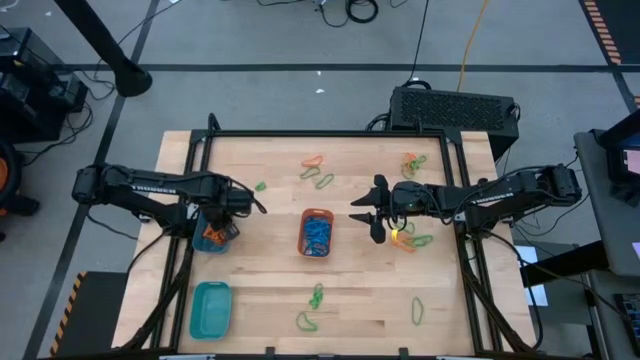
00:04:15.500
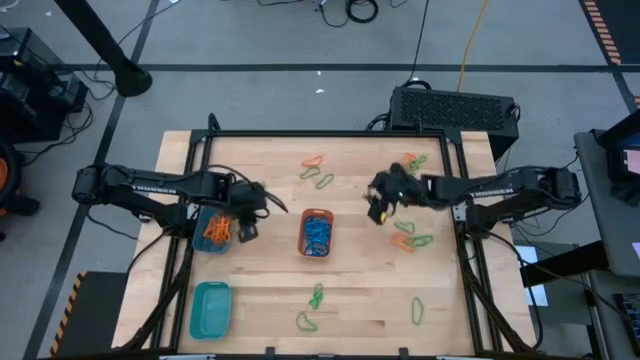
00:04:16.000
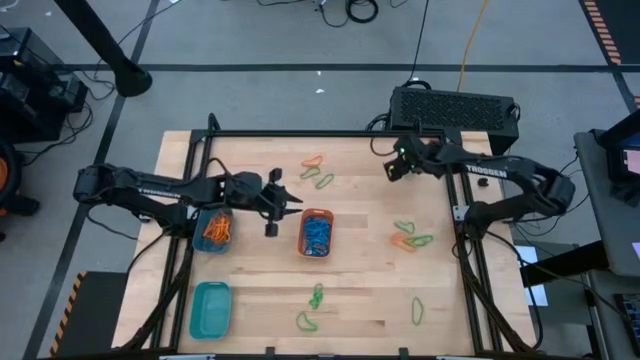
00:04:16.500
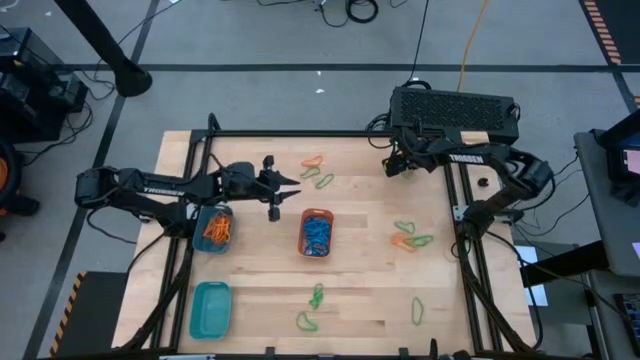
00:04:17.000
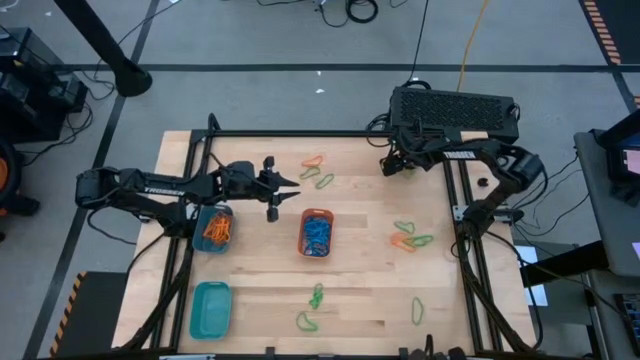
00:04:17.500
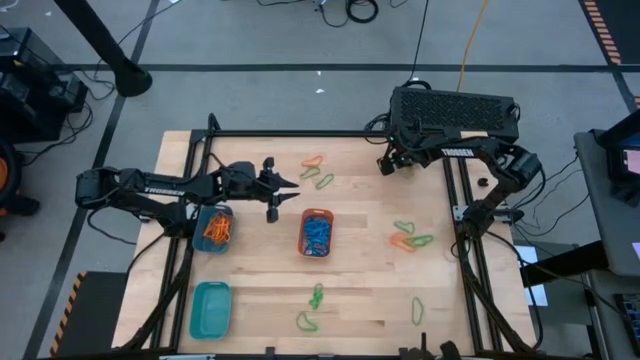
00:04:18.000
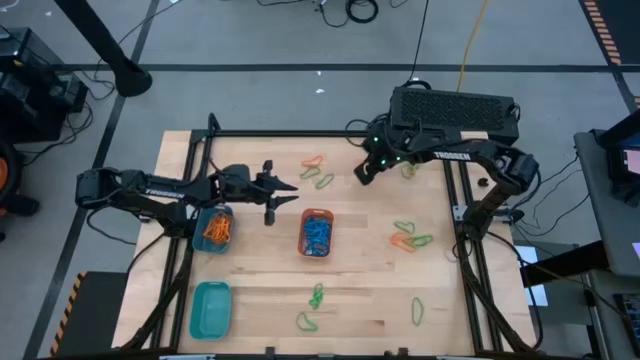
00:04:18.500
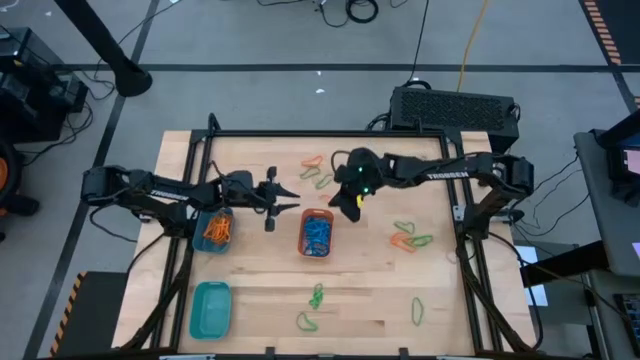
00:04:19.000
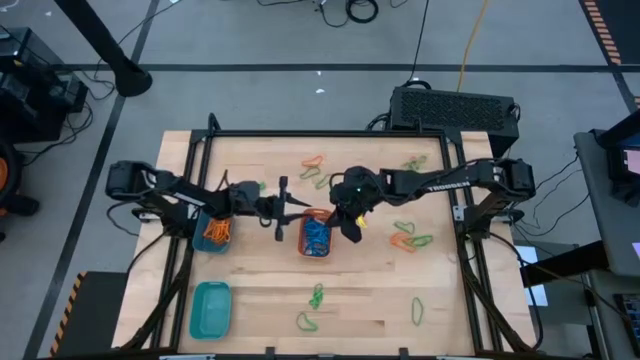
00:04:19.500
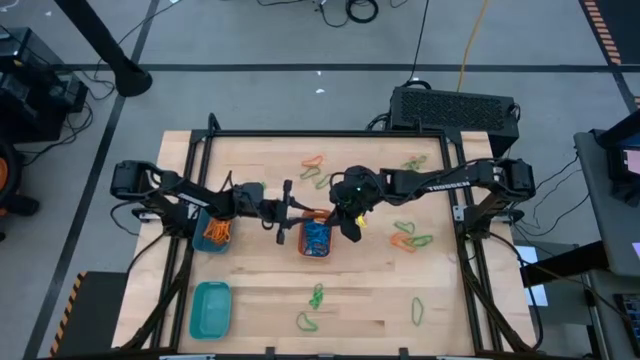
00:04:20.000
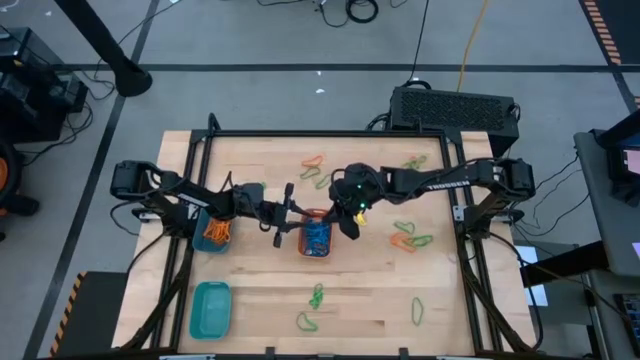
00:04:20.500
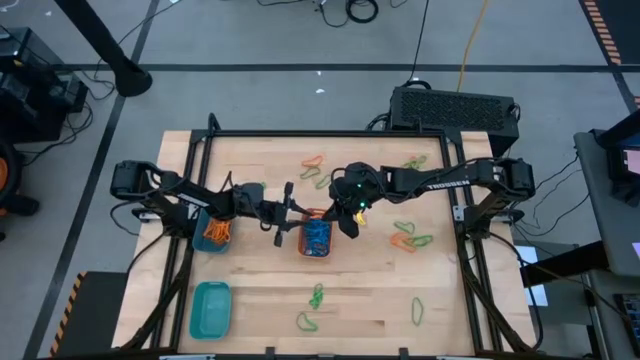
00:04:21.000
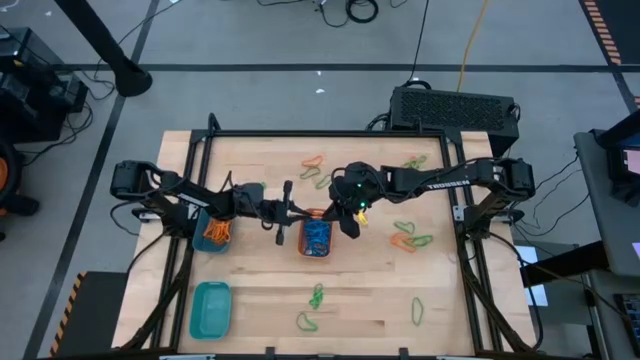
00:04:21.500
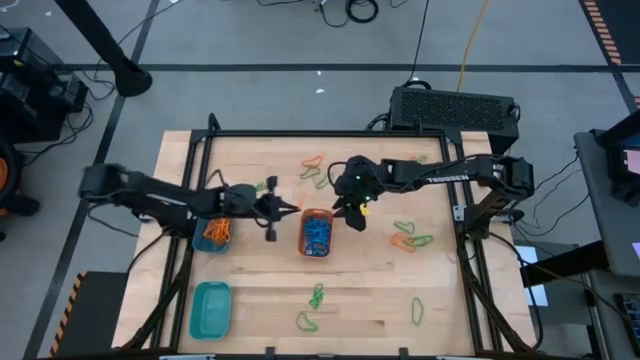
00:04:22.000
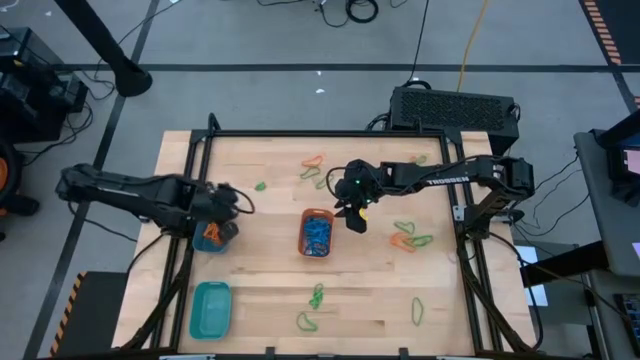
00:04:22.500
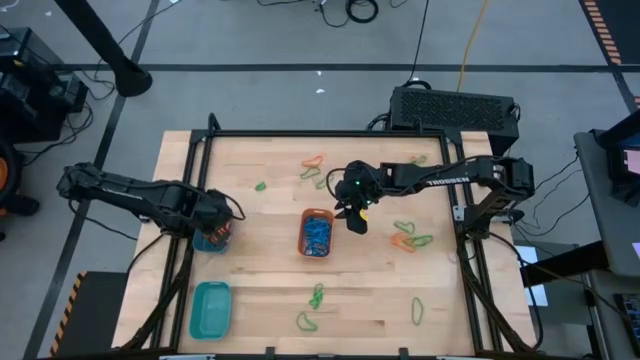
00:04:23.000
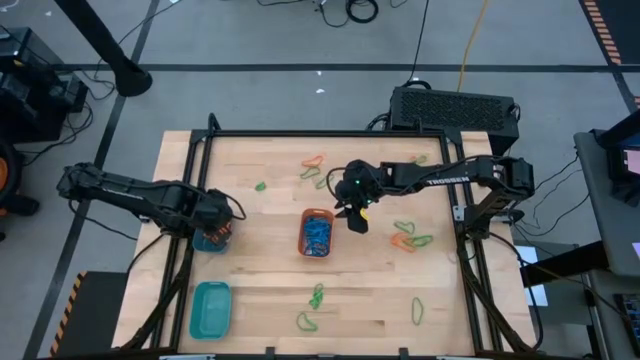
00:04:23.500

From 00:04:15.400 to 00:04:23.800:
Task: Sort rubber bands into baskets
Put the orange rubber band into the blue bin

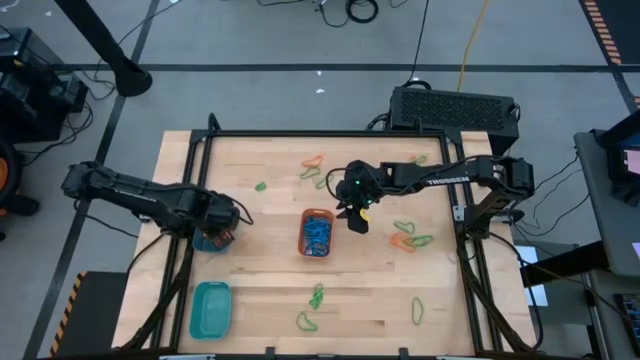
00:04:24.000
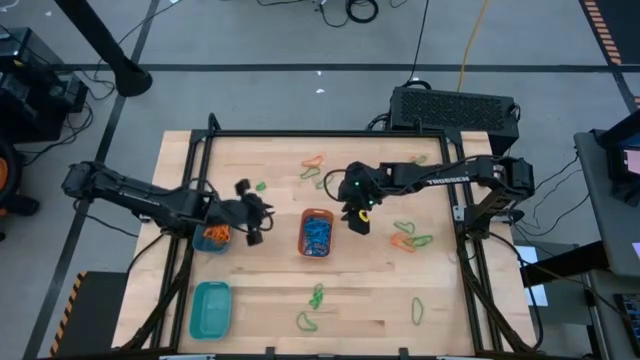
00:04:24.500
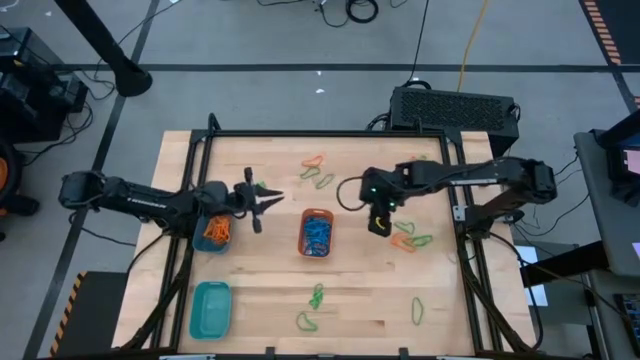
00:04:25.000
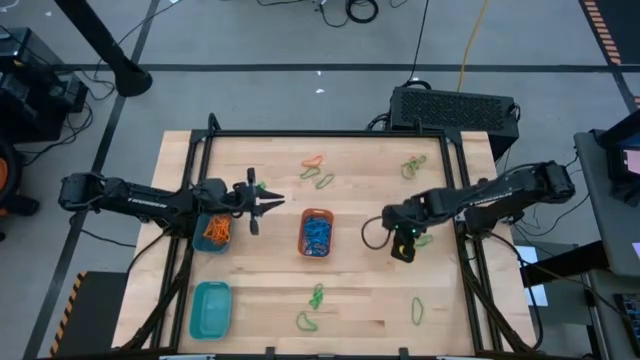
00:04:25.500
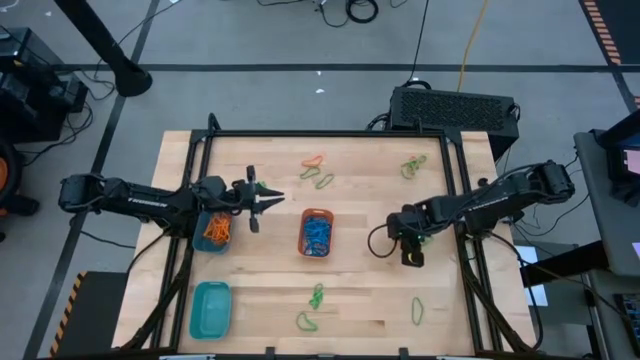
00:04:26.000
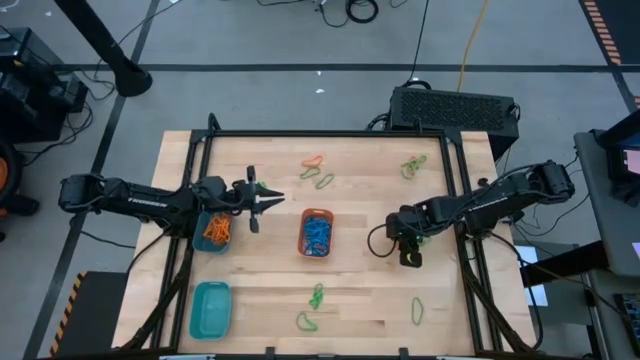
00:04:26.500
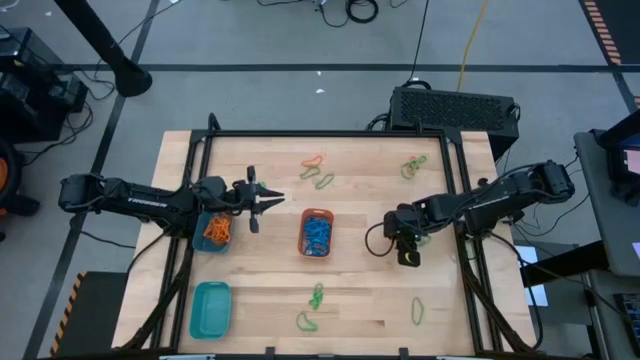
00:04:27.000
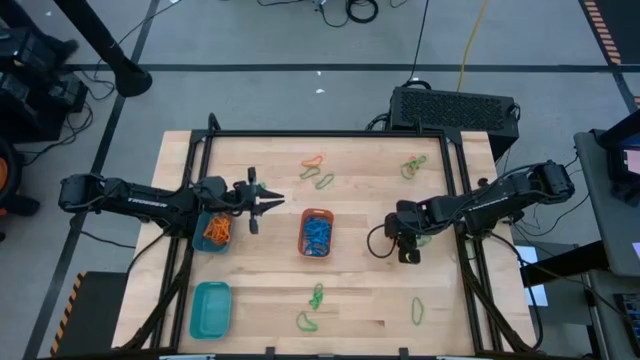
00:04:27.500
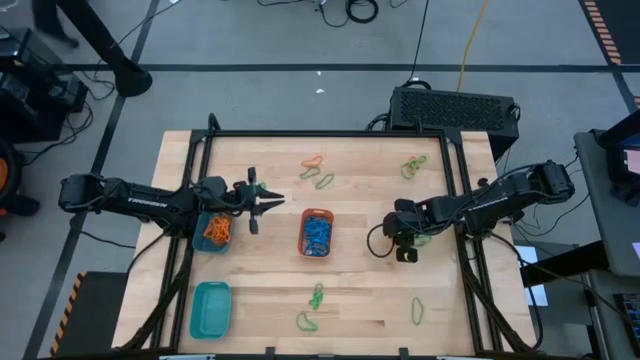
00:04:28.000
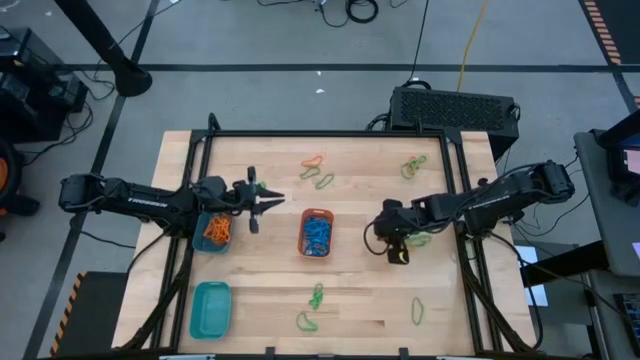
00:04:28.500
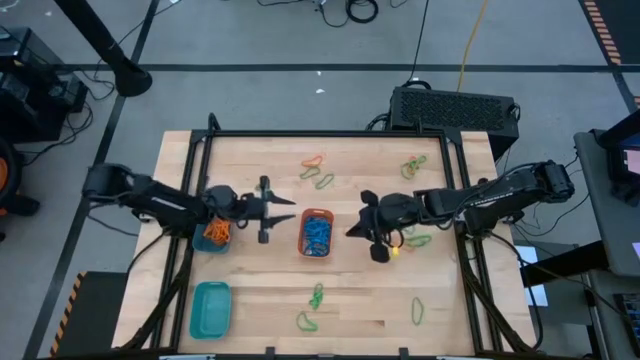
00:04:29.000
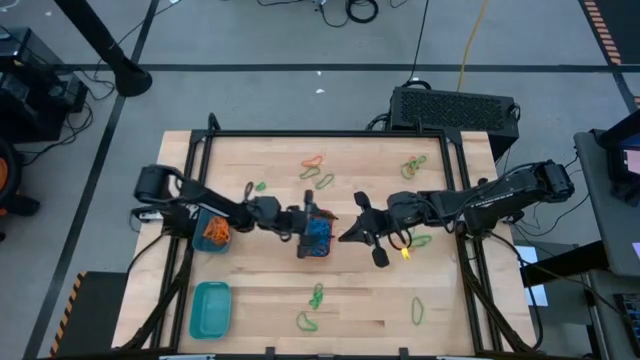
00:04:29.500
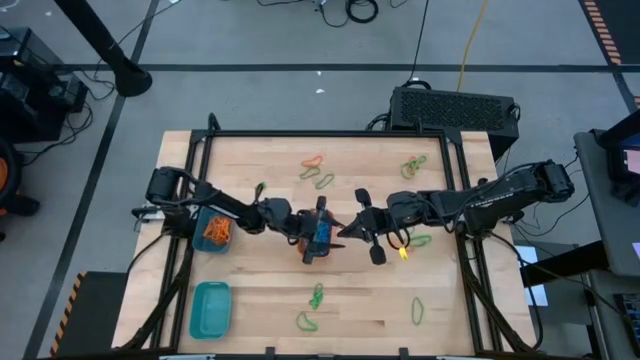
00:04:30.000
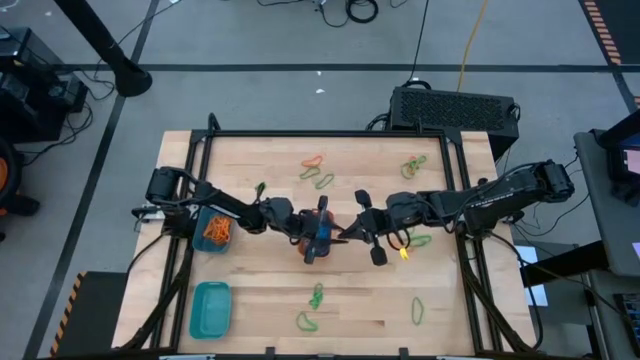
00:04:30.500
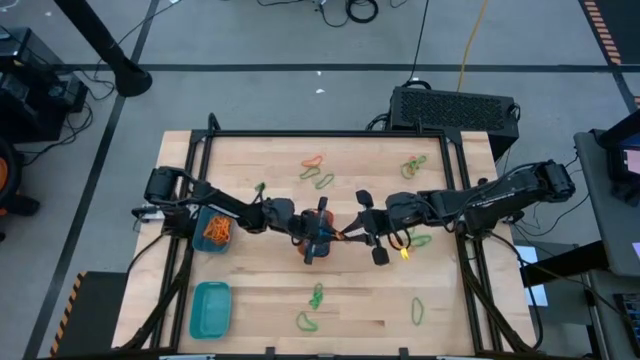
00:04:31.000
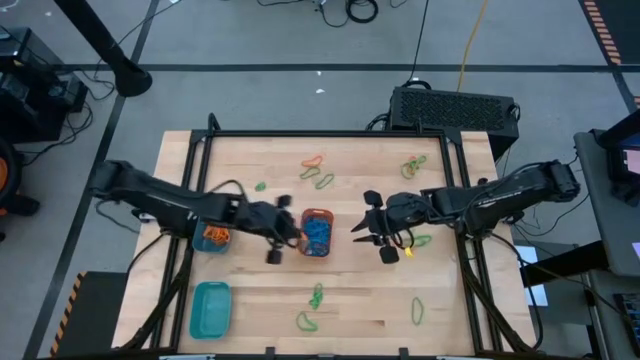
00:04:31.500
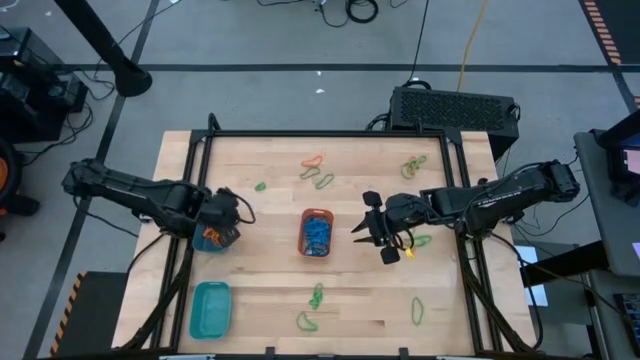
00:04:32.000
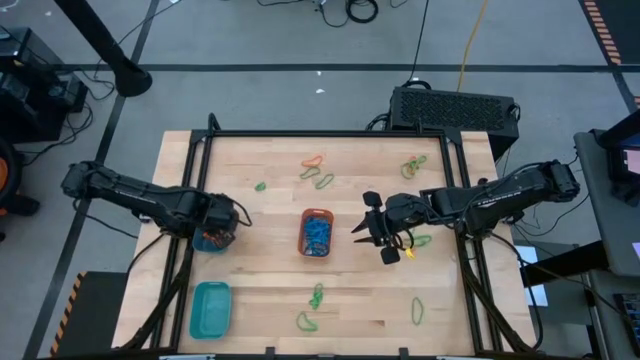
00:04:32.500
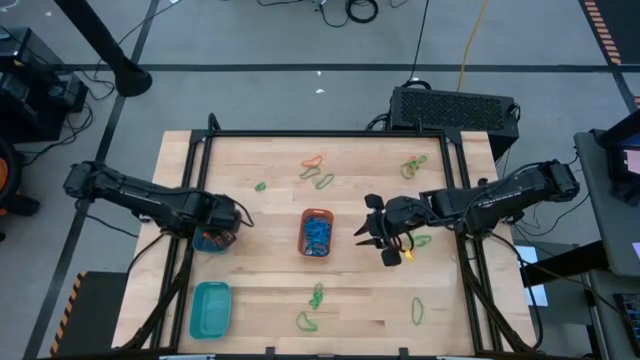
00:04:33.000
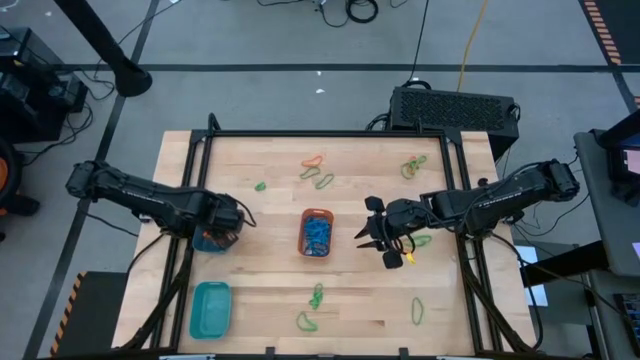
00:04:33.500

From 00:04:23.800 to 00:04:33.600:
Put the orange rubber band into the blue bin

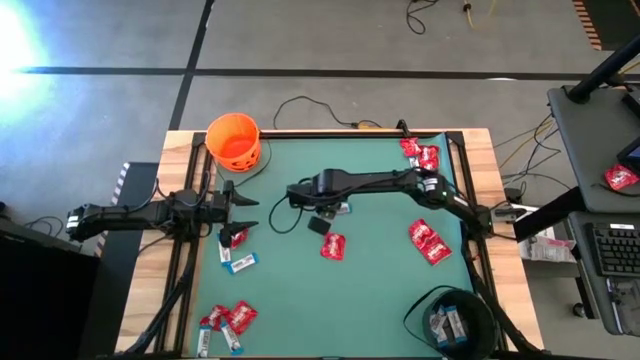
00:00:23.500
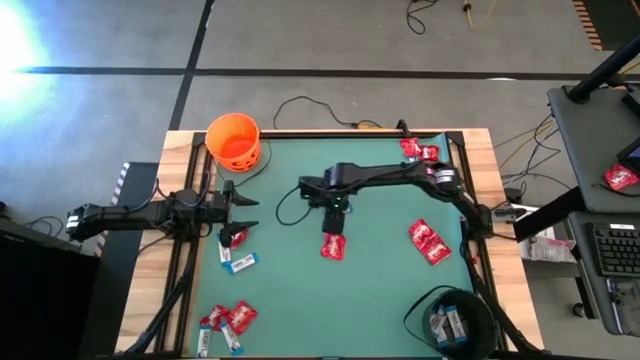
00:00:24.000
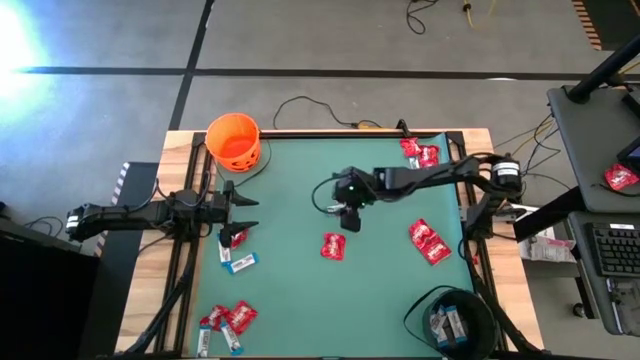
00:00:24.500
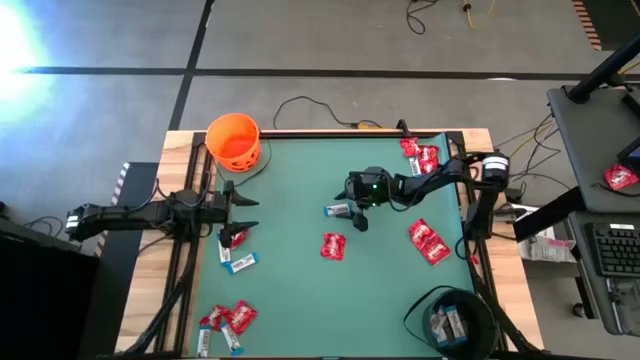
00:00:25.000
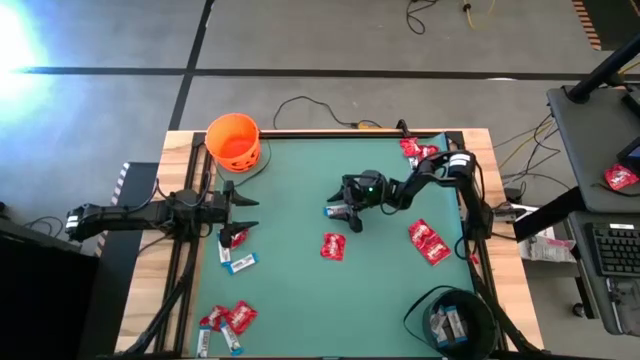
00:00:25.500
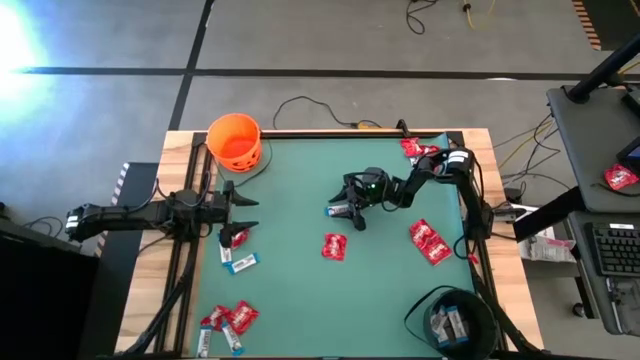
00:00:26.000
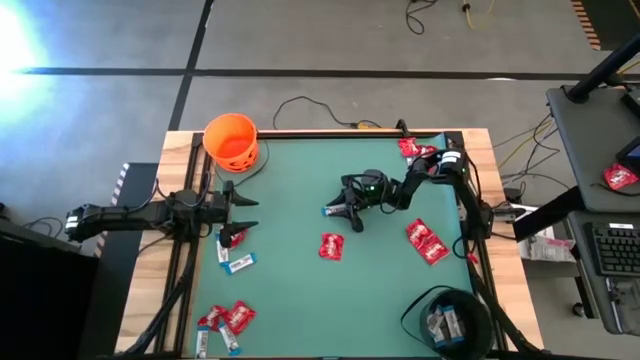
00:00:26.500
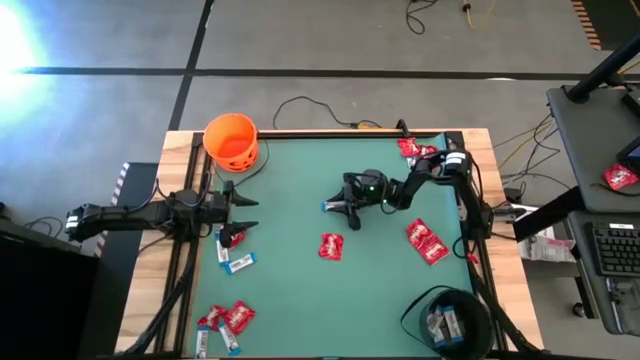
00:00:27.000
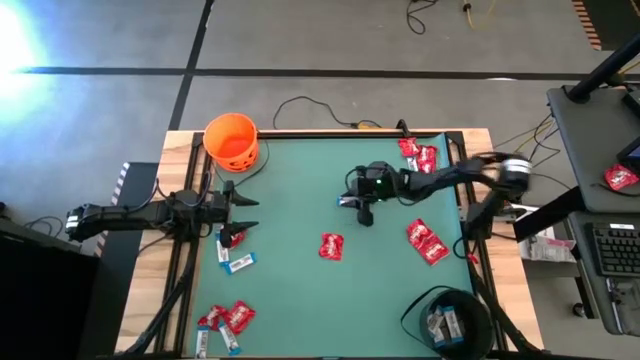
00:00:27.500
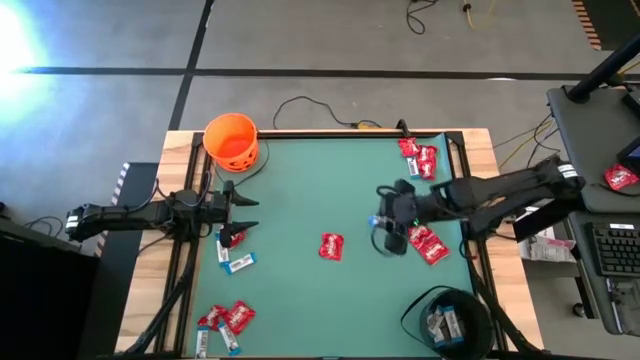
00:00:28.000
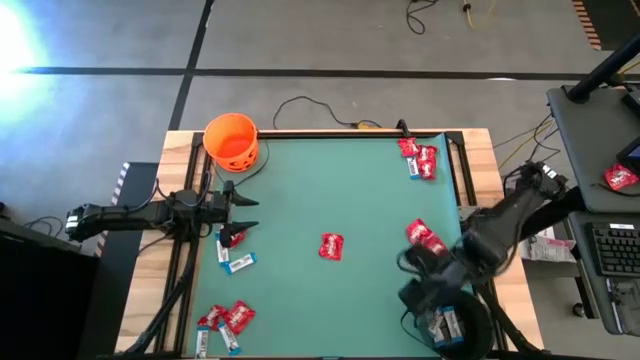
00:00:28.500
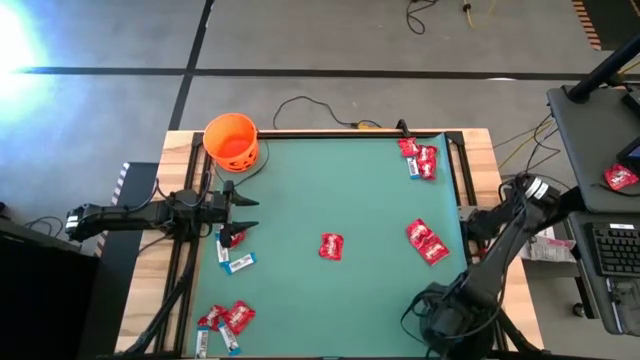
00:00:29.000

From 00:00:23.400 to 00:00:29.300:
Task: Sort candy by brand, put in halloween buckets
Put the white chocolate into the black bucket
